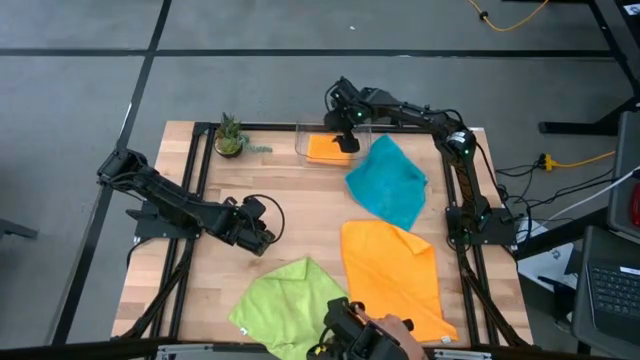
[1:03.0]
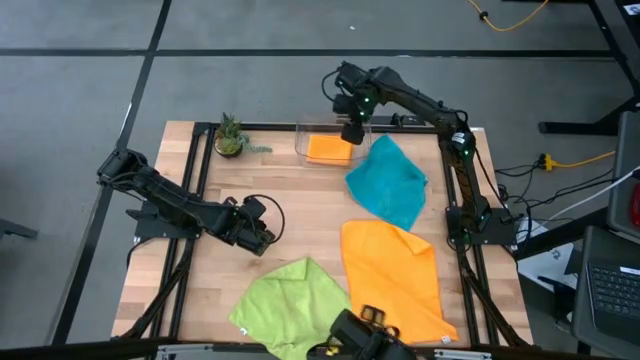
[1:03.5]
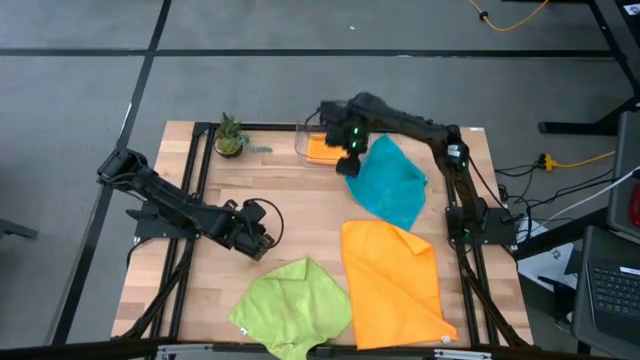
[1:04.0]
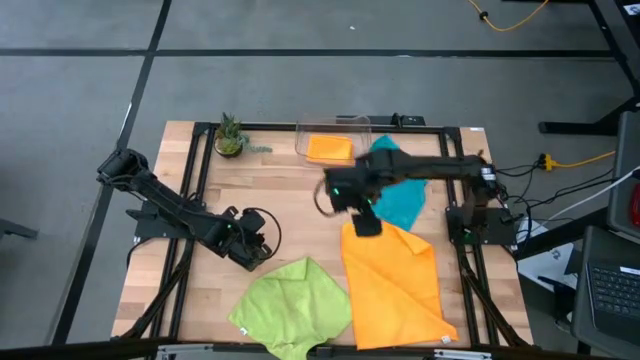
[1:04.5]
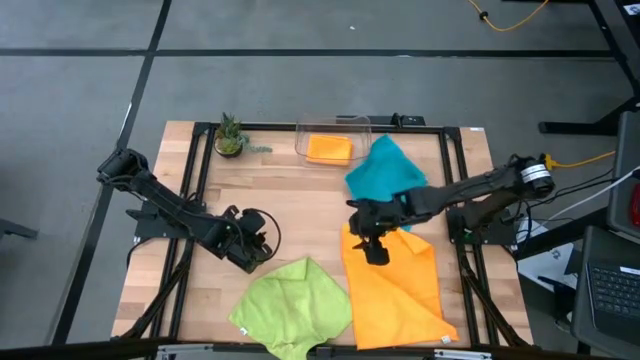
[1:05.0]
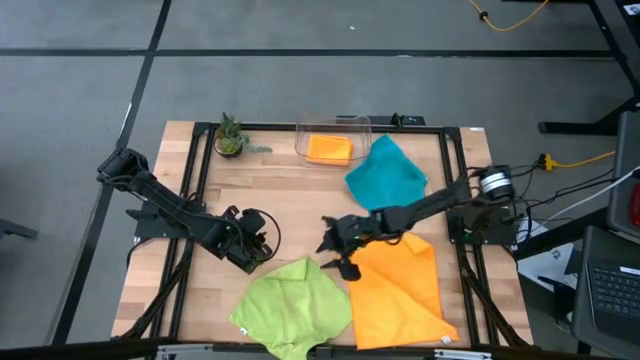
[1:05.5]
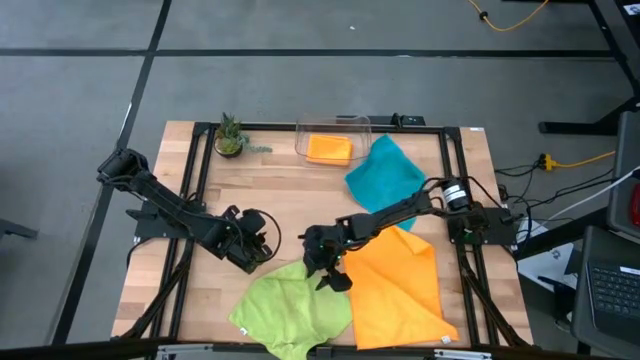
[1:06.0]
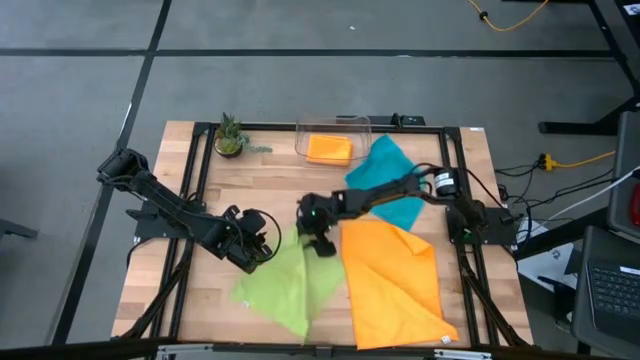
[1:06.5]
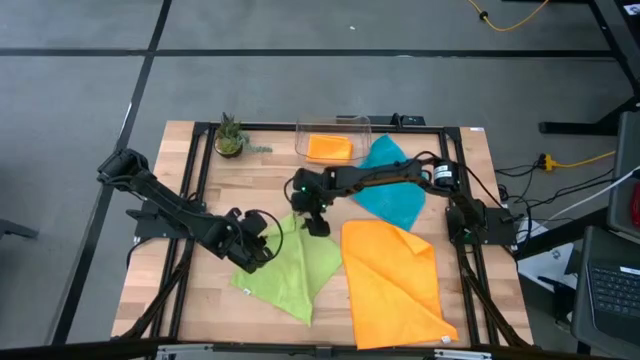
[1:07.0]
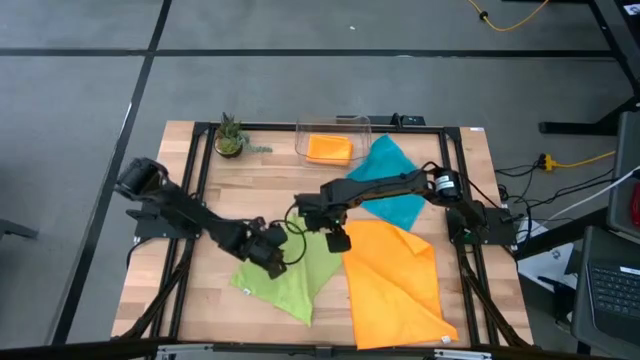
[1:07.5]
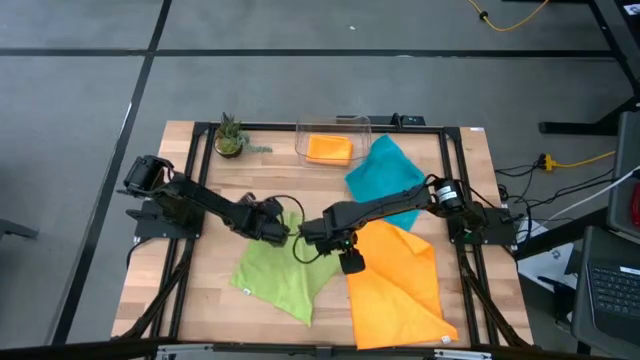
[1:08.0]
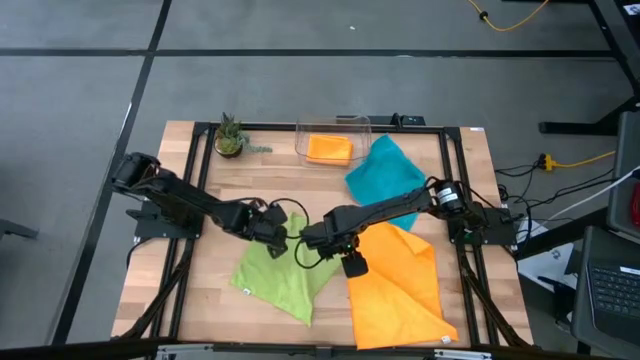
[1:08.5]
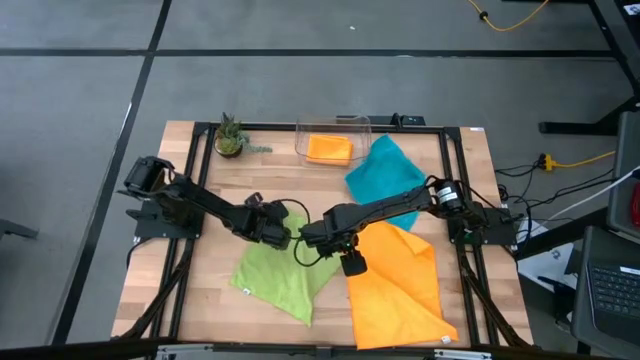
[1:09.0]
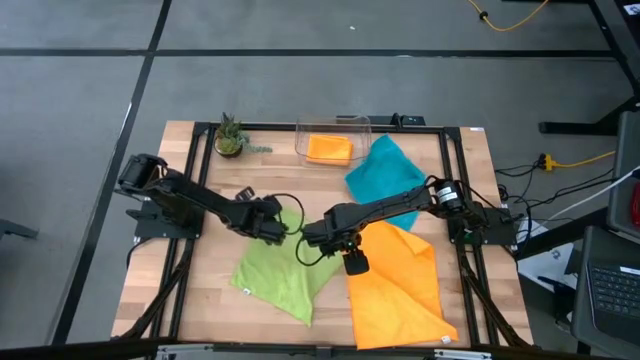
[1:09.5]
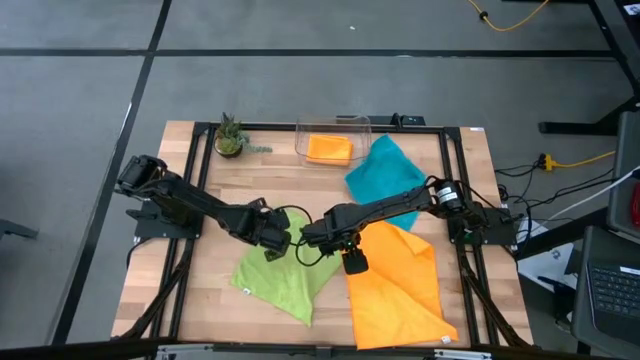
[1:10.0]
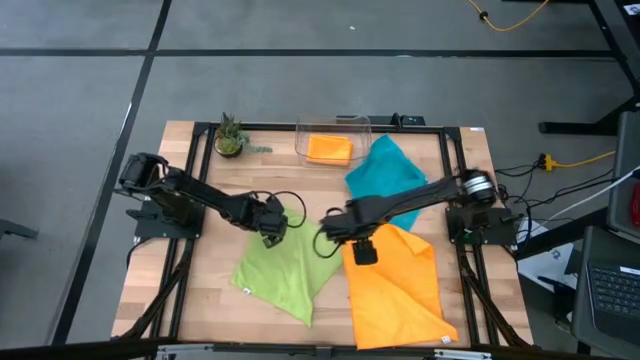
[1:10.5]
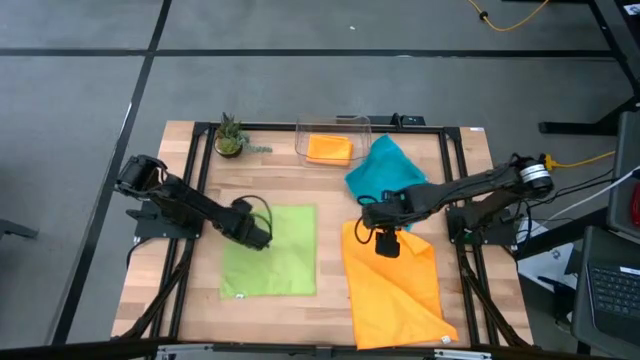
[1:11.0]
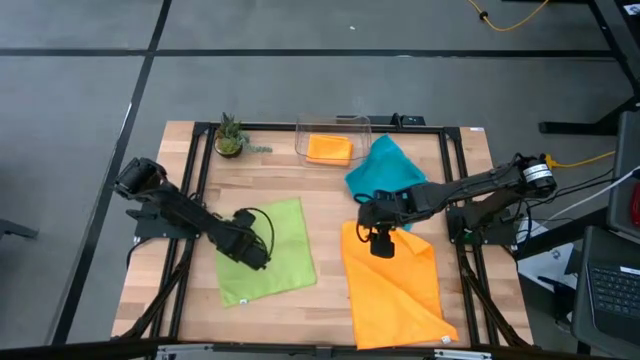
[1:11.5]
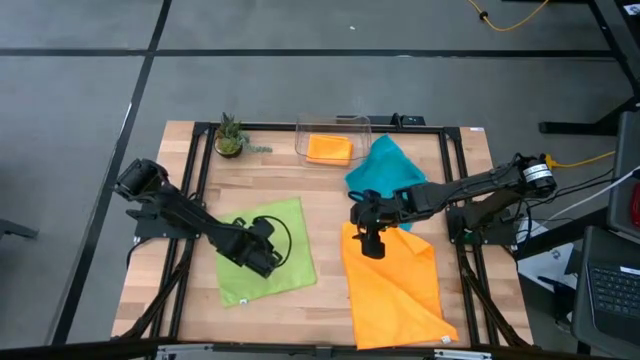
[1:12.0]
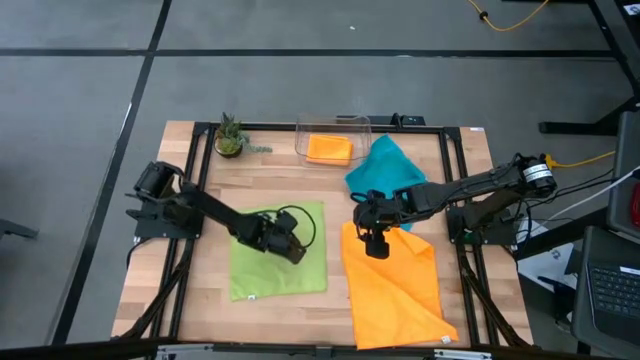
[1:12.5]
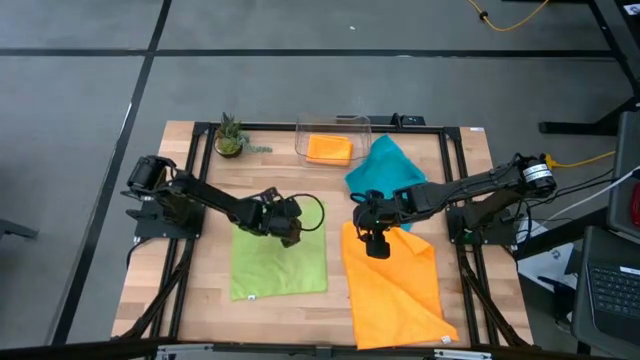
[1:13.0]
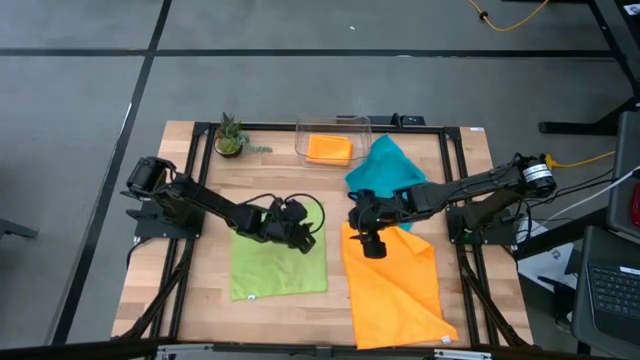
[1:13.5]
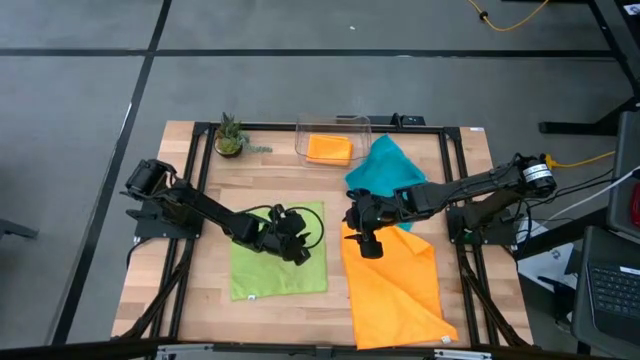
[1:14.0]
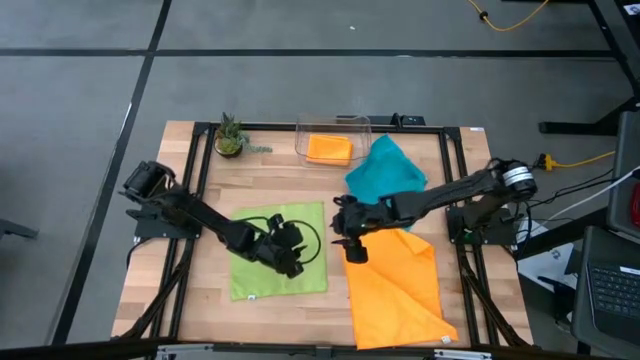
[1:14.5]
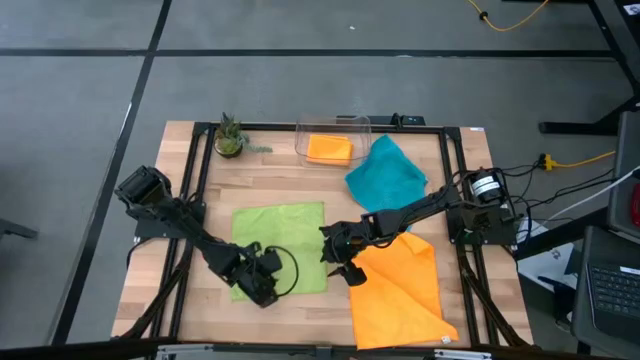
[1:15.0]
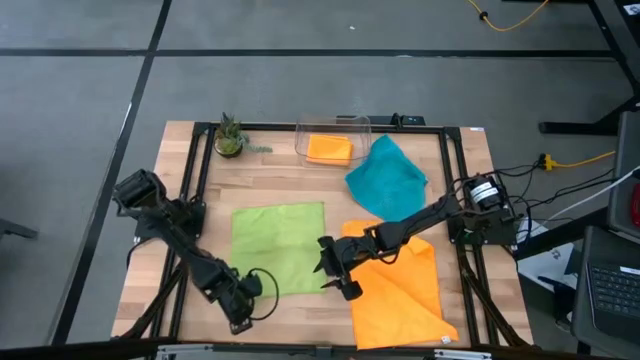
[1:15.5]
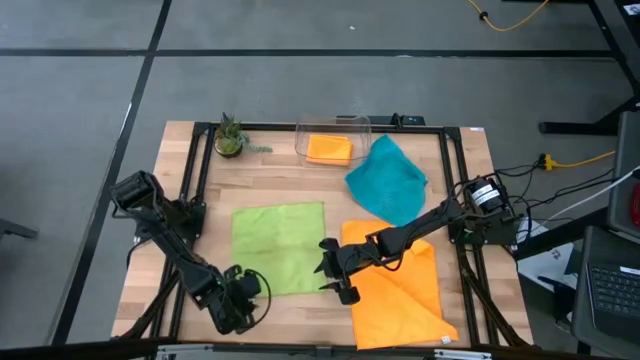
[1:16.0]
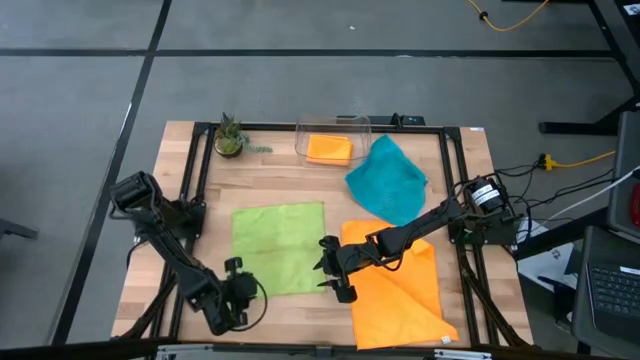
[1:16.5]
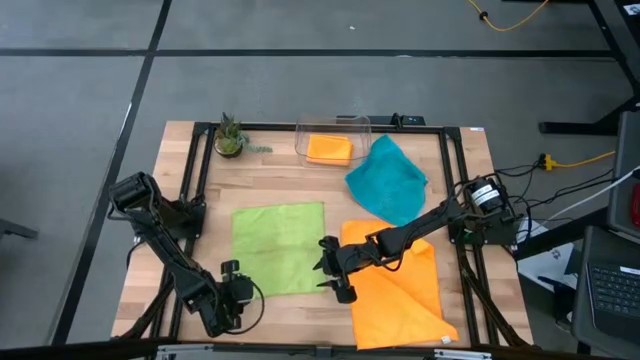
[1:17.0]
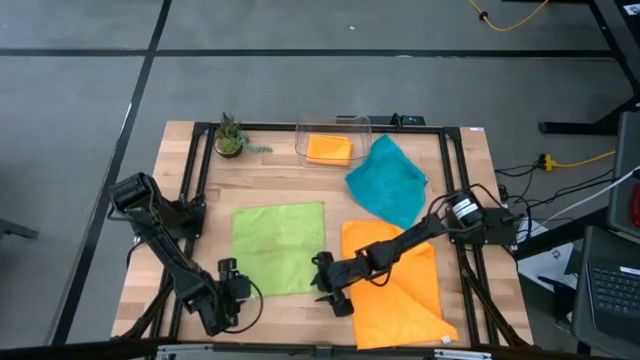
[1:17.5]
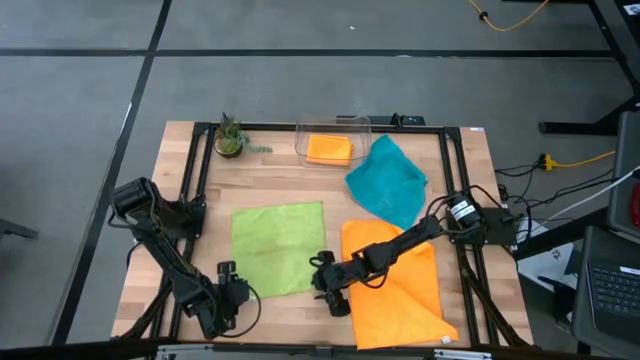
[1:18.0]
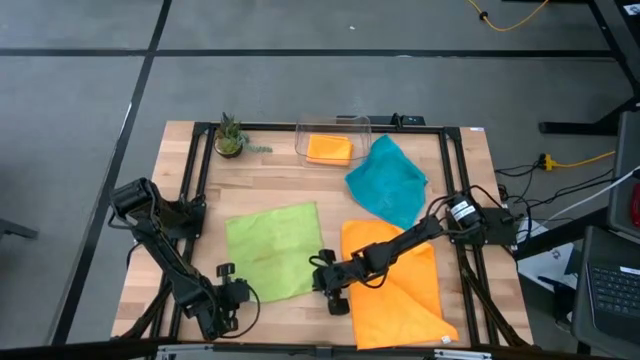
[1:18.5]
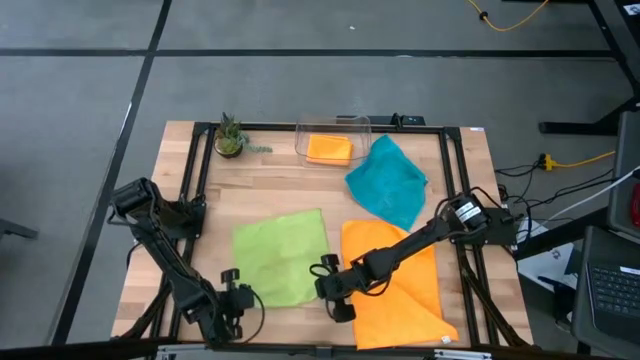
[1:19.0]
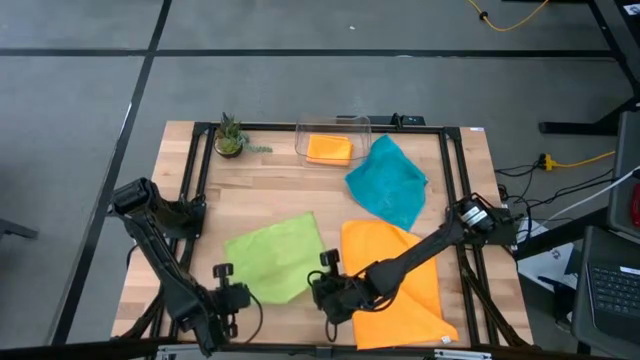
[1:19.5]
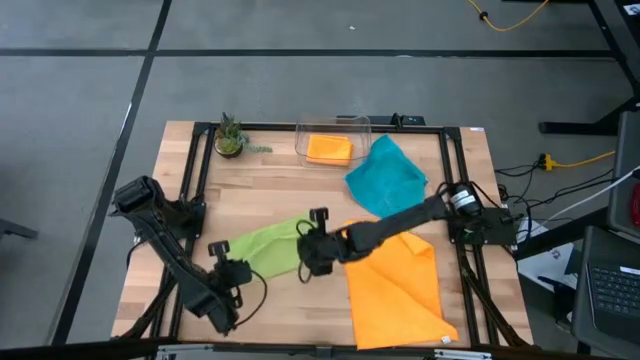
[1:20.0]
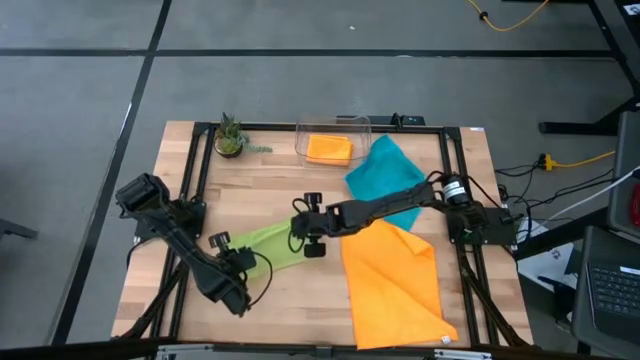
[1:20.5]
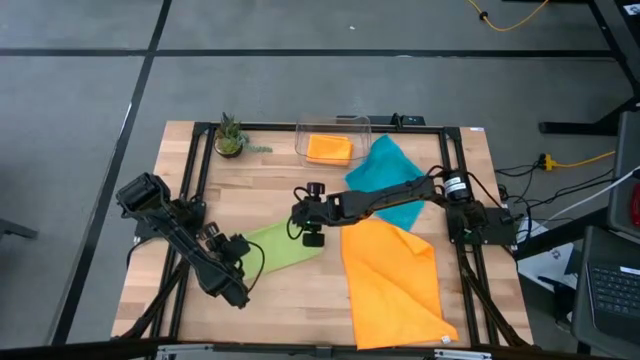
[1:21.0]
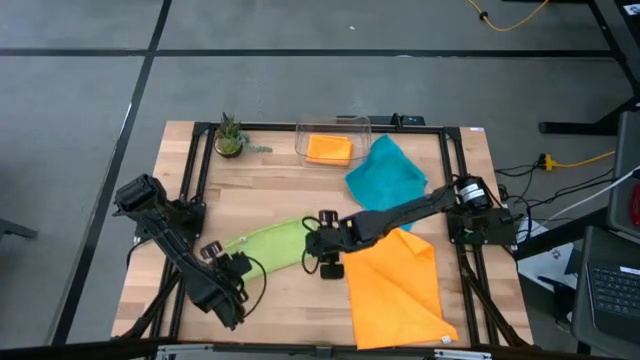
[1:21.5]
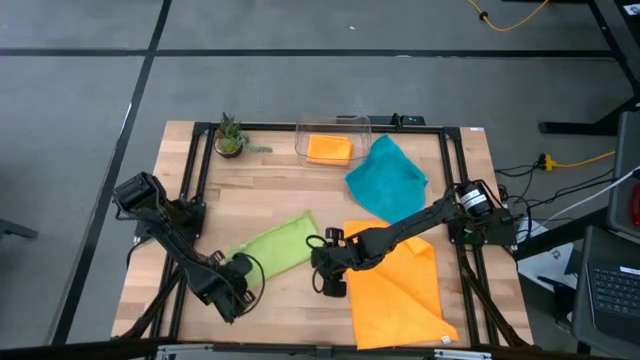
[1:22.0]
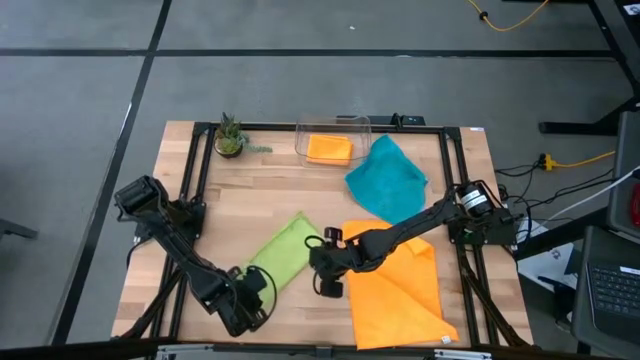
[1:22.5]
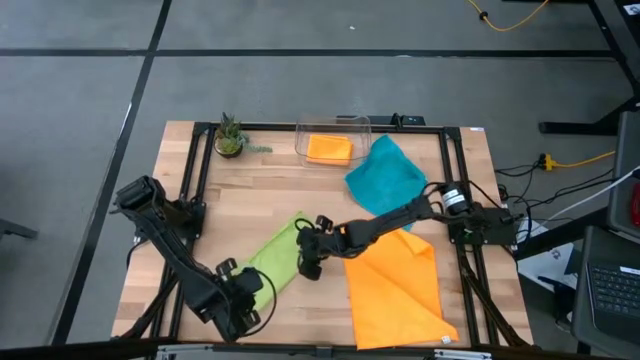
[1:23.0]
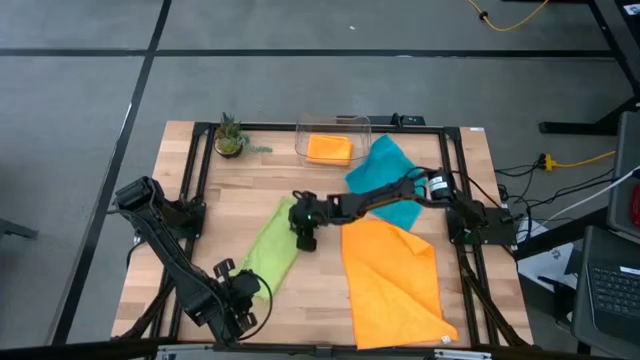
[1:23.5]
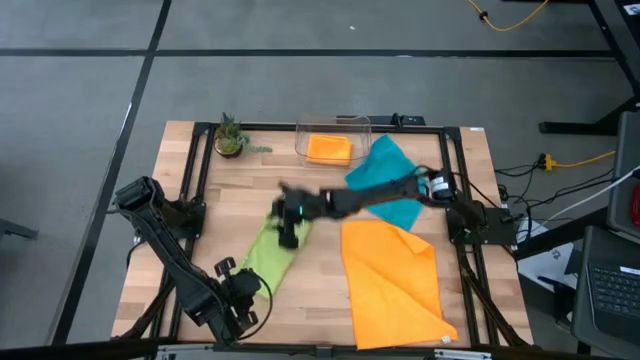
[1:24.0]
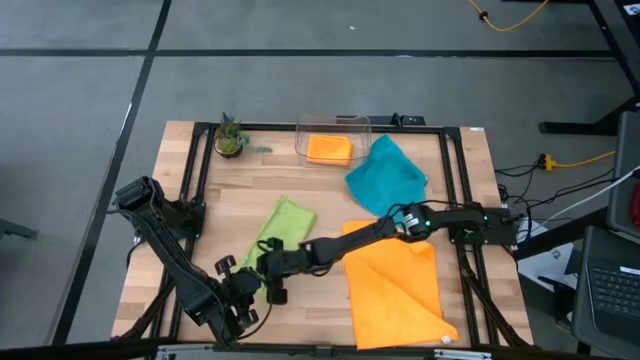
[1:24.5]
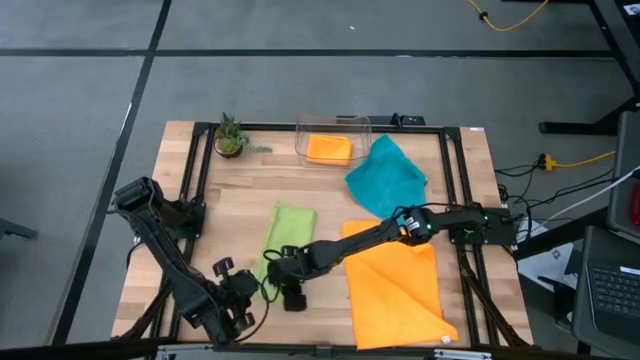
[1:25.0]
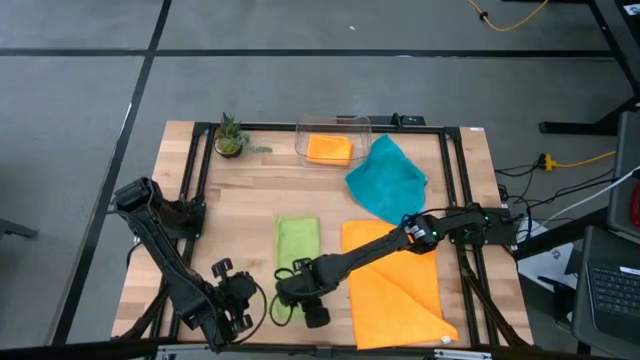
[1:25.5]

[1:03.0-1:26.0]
Task: Fold microfiber towels
Fold the green microfiber cloth
